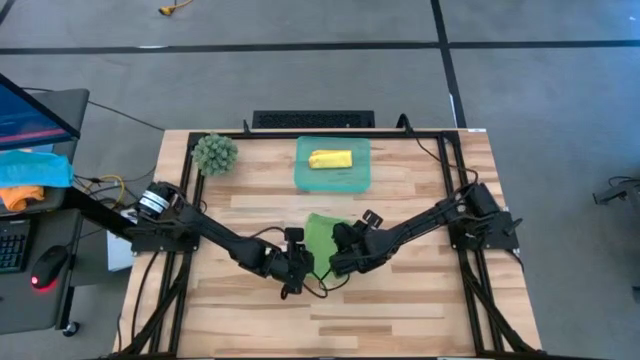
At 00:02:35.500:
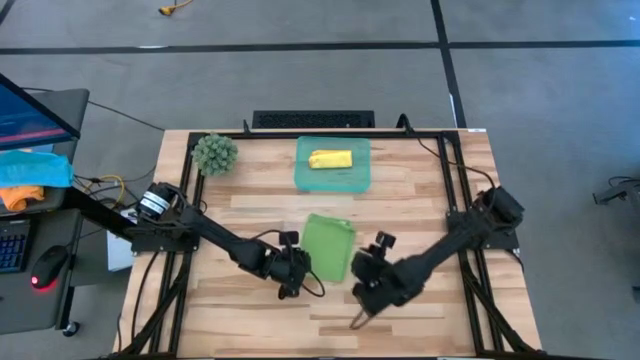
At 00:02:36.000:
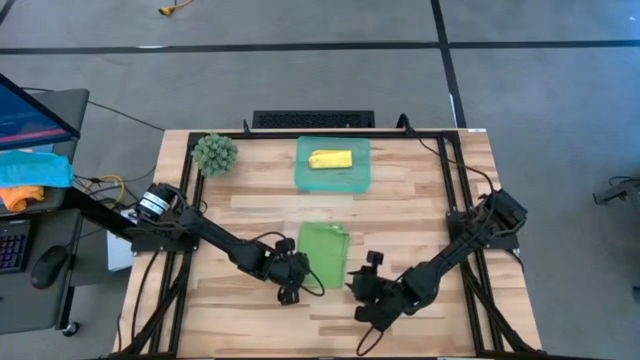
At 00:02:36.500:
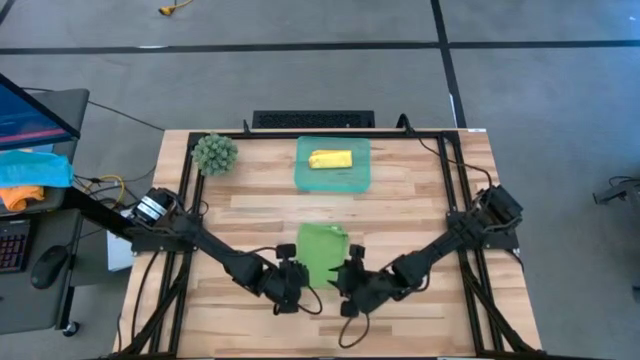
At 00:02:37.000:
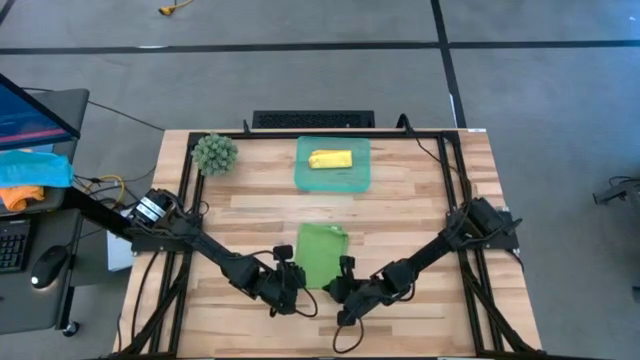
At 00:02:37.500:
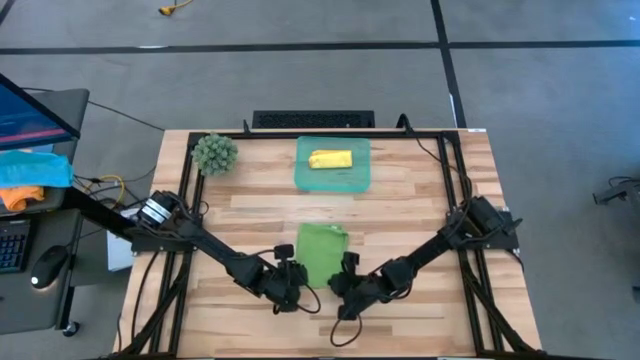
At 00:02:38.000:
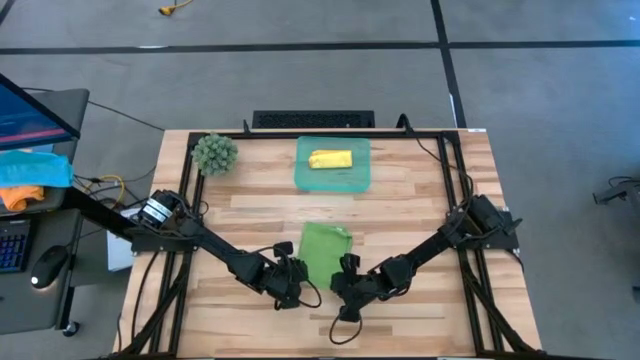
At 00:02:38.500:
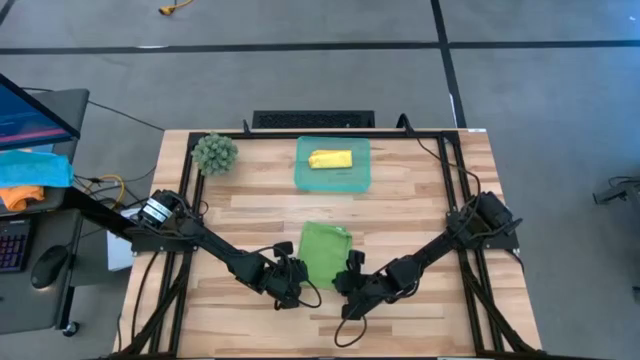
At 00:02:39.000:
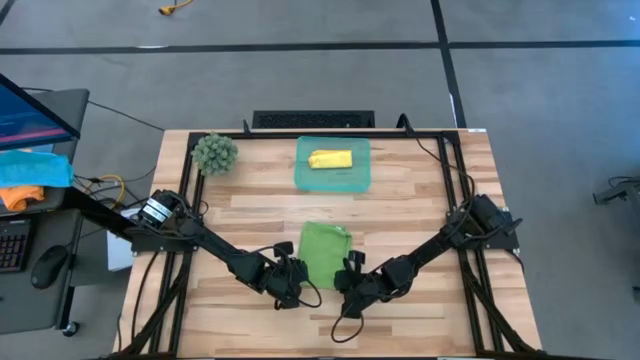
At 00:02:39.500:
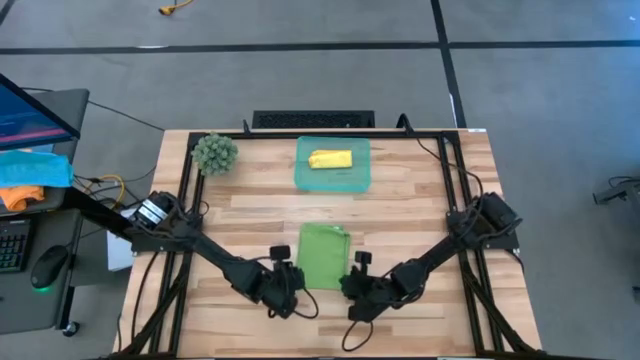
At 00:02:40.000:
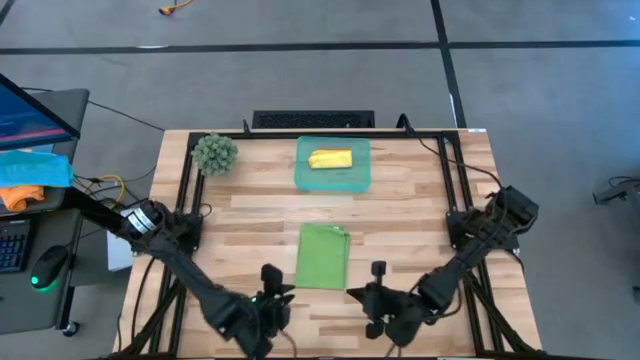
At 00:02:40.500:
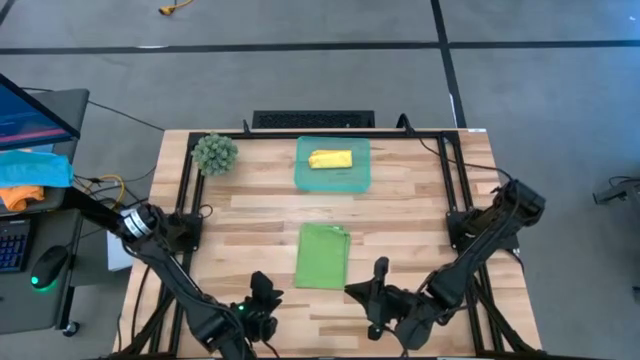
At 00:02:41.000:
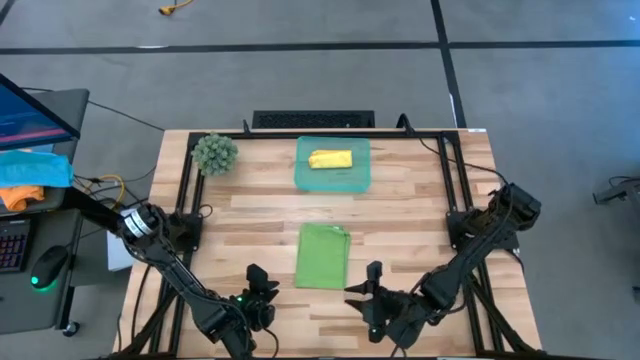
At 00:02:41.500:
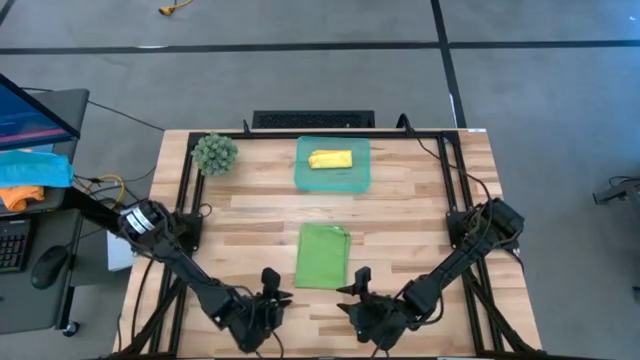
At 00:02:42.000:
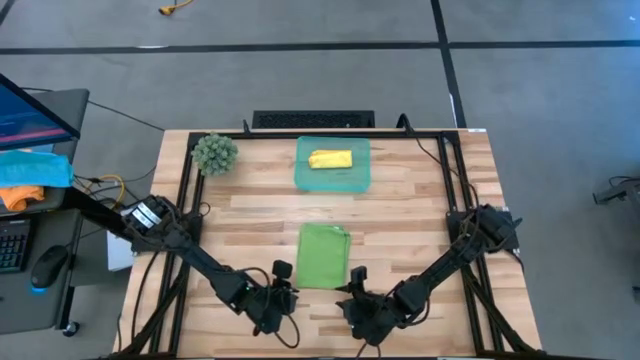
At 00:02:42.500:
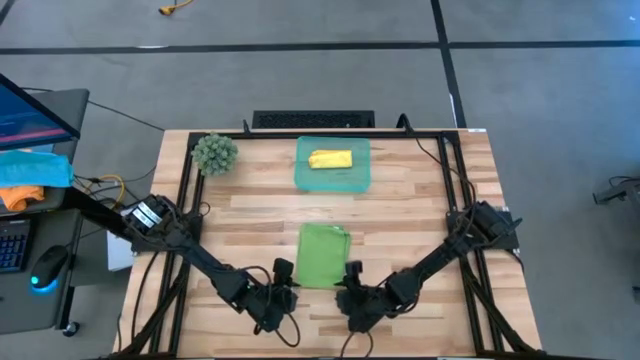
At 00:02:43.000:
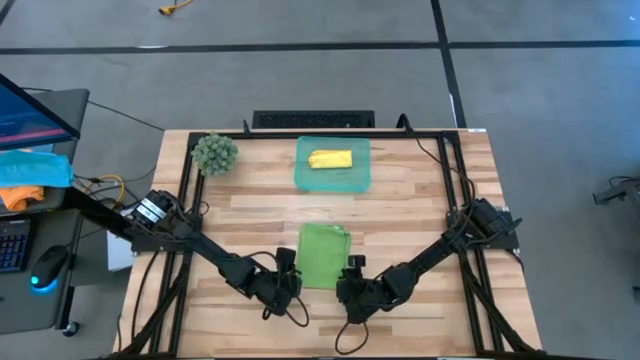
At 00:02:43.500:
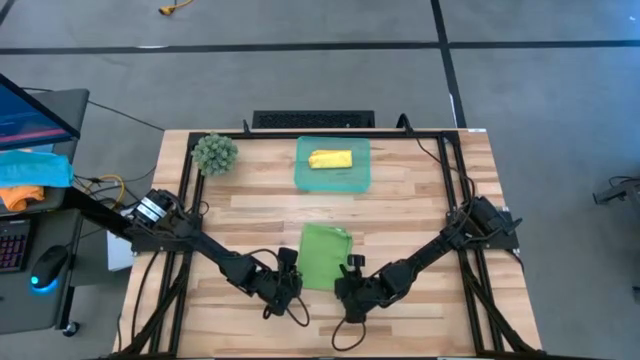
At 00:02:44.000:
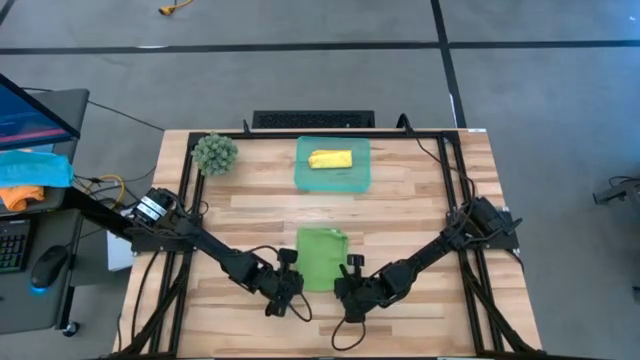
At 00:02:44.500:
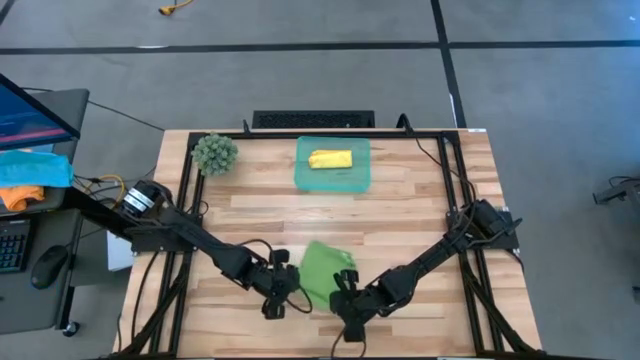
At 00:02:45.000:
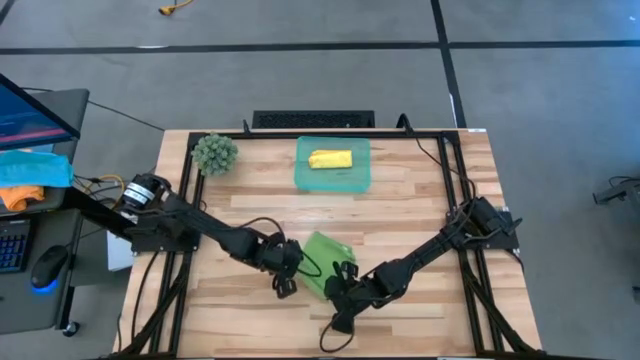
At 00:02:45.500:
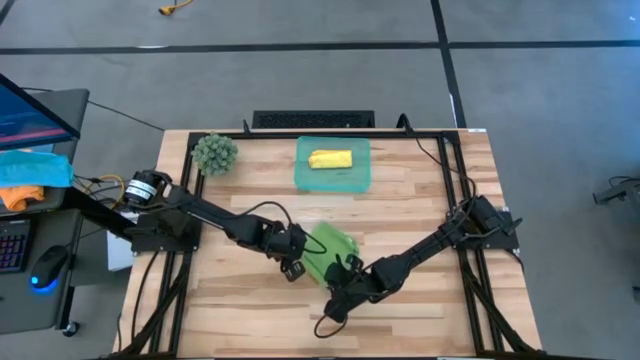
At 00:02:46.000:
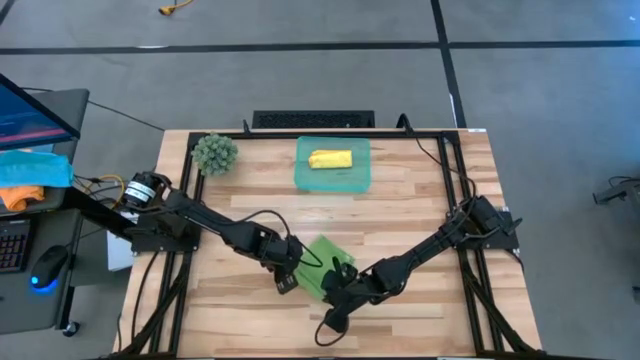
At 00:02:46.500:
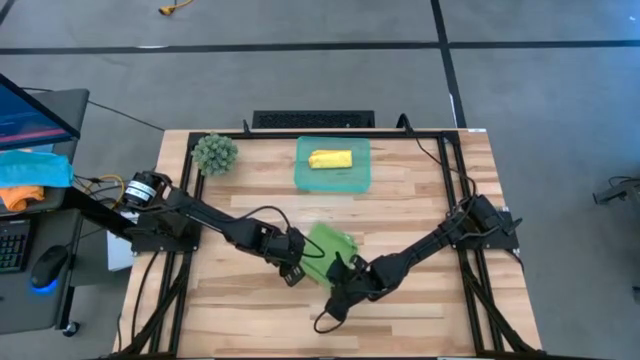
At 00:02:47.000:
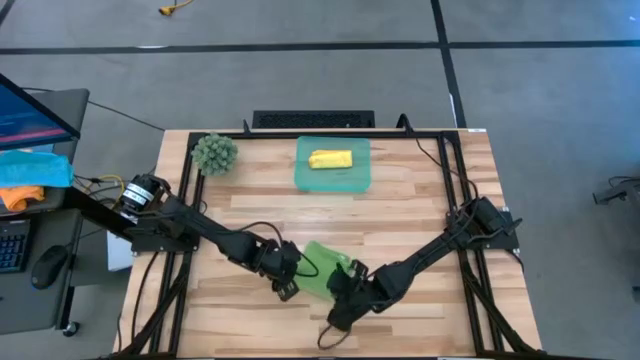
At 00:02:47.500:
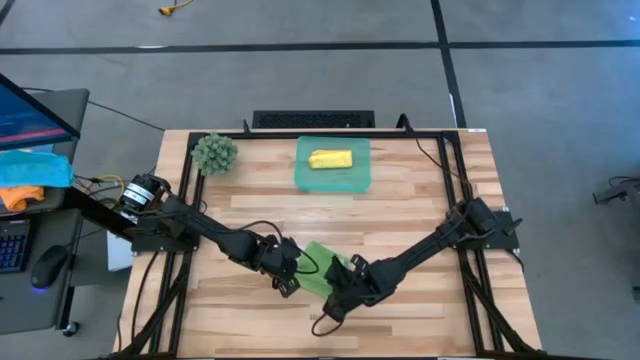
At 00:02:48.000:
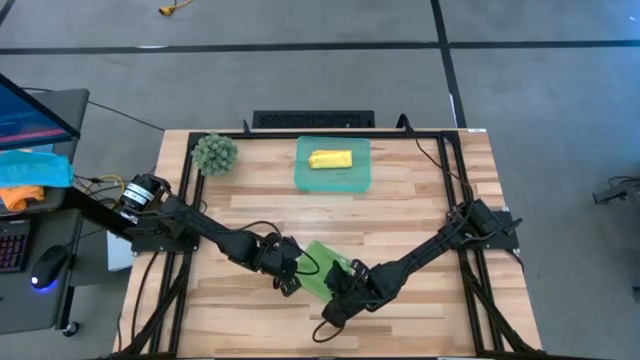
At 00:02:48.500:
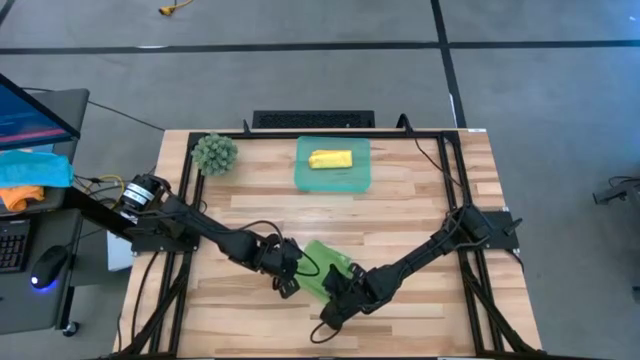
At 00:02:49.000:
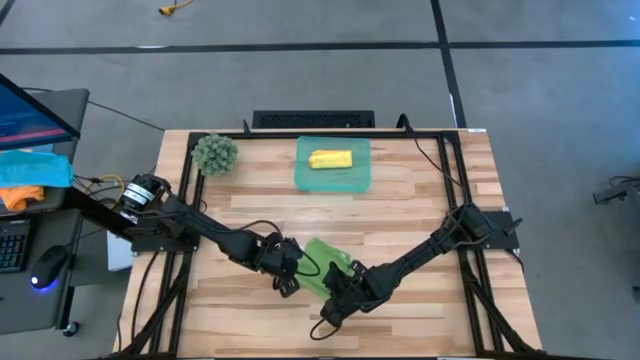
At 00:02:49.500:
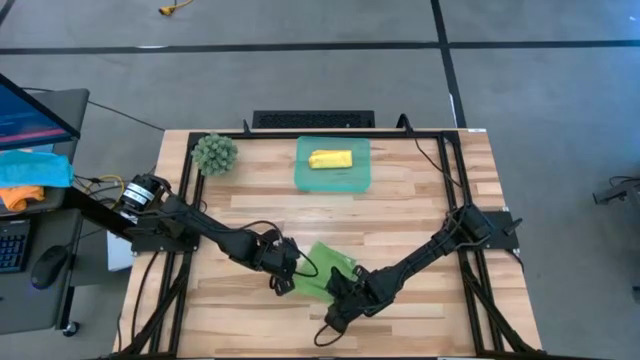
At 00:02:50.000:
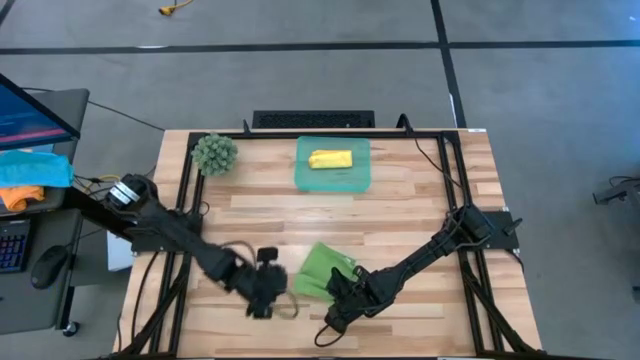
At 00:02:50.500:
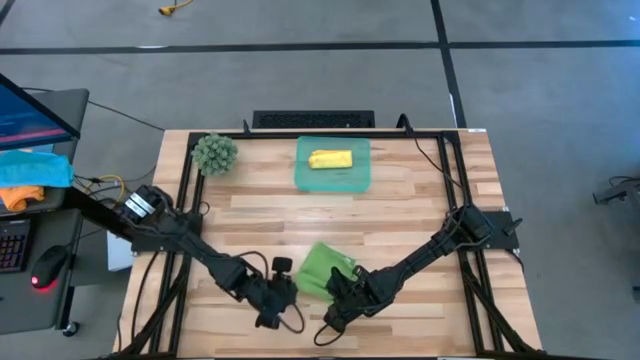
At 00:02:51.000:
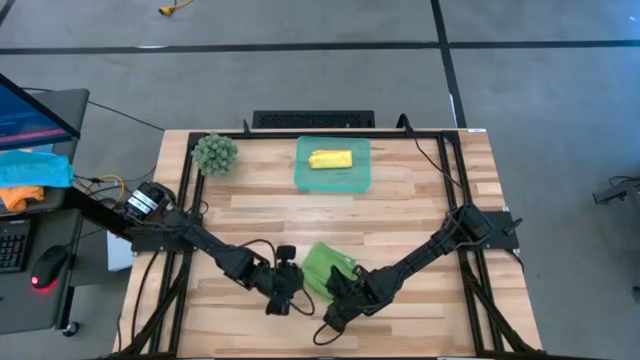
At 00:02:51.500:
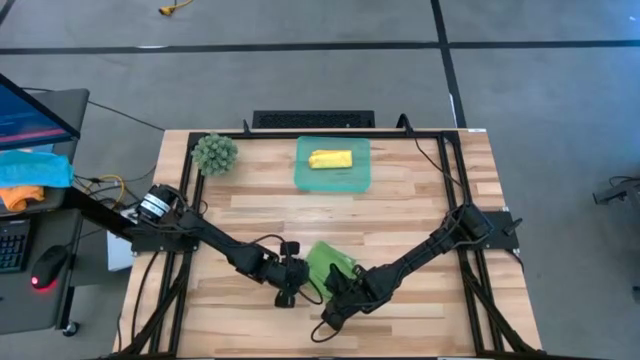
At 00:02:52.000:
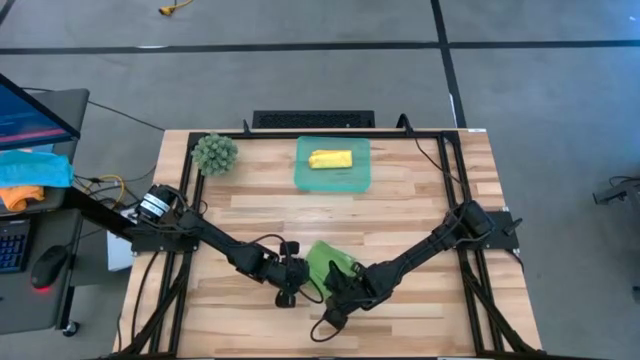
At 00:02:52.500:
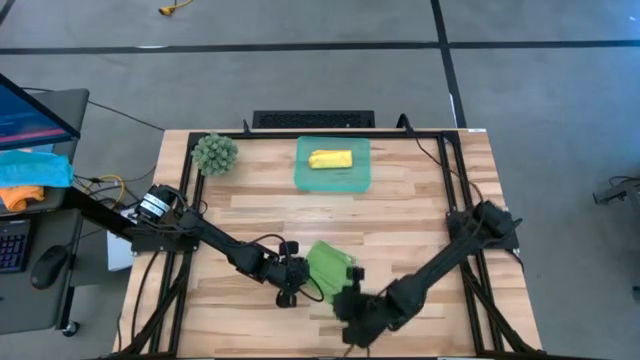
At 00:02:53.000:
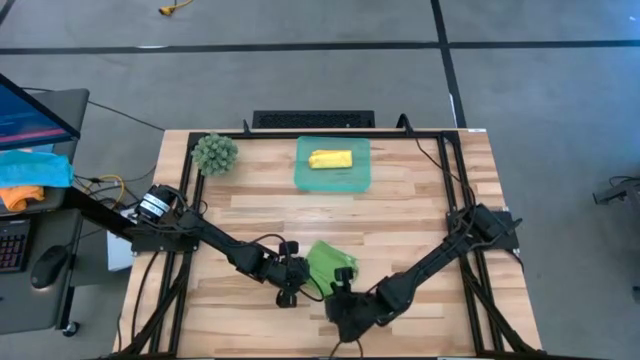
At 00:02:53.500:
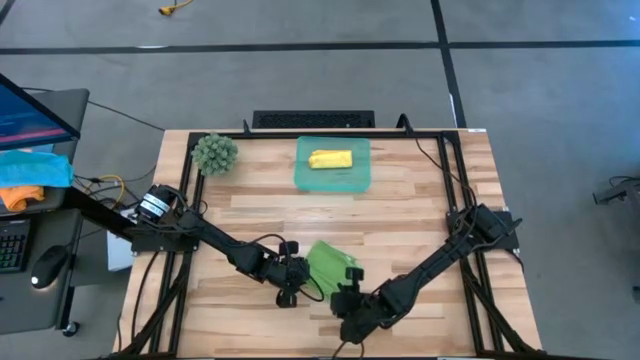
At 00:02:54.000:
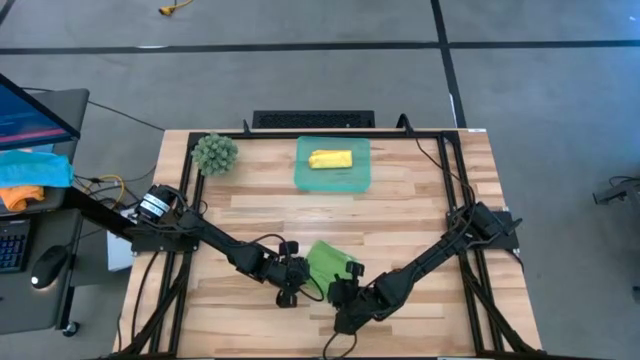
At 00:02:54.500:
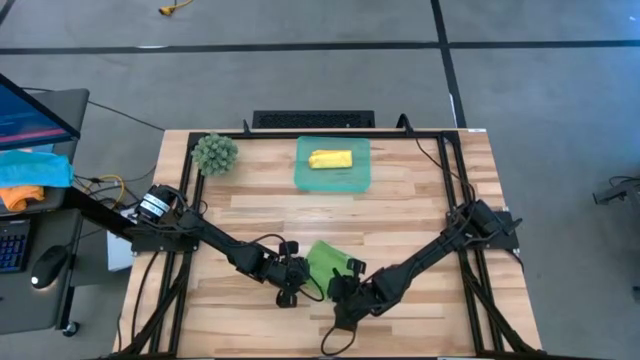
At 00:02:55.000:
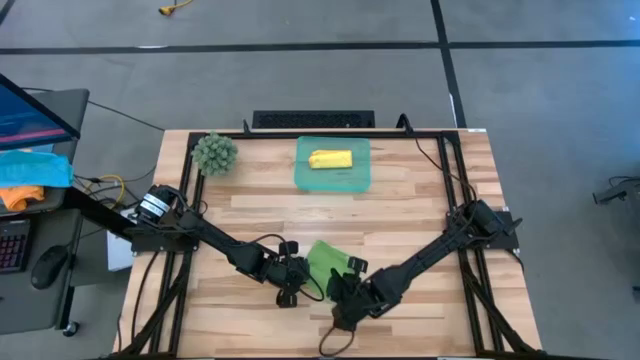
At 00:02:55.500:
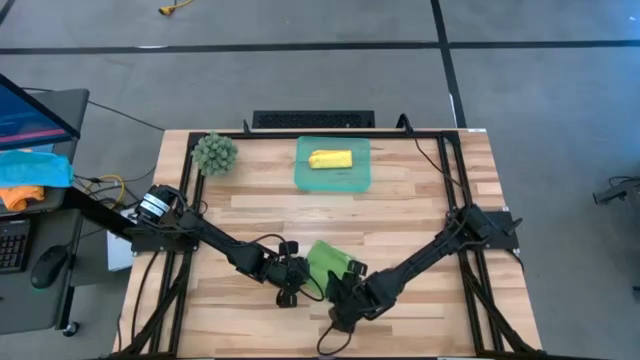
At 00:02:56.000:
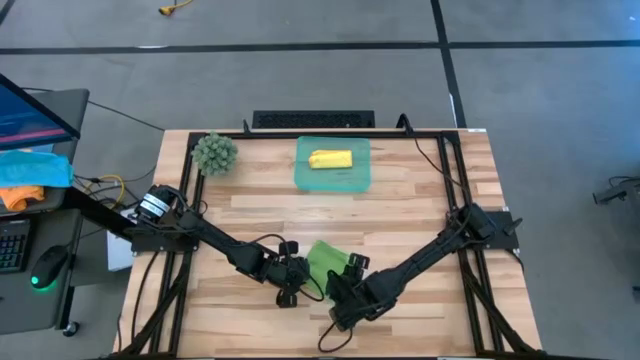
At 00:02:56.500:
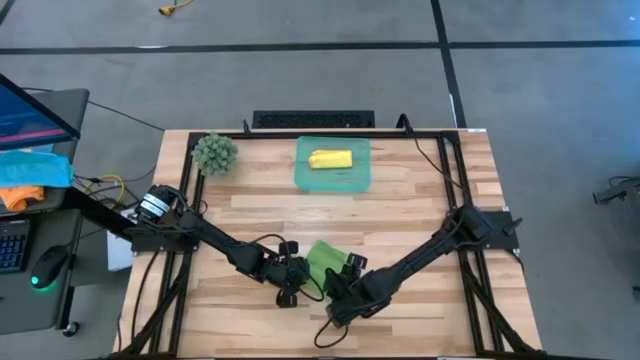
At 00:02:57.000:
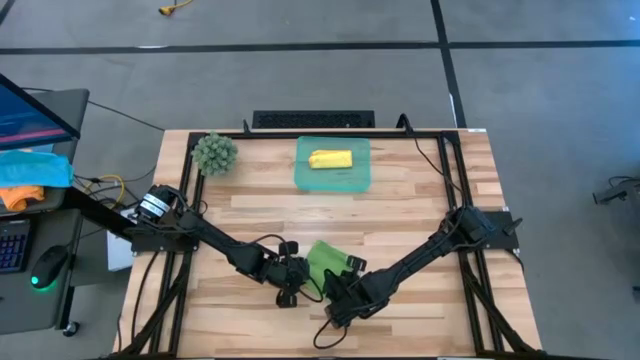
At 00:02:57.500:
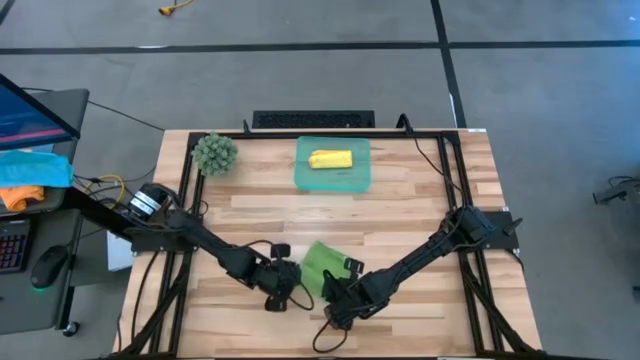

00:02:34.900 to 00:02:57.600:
Task: Roll microfiber towels into tight, uniform cylinder then place into a basket
Roll the green microfiber cloth
